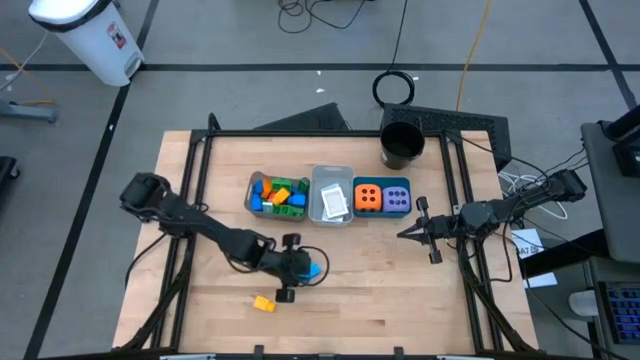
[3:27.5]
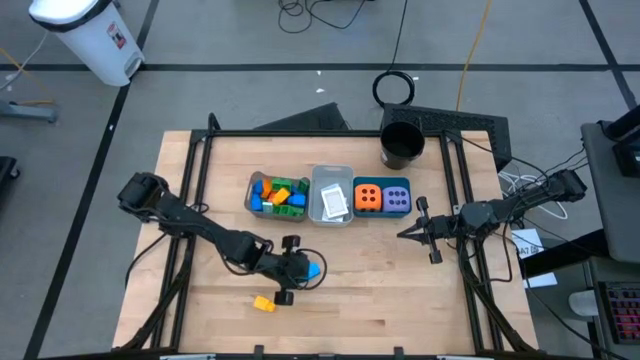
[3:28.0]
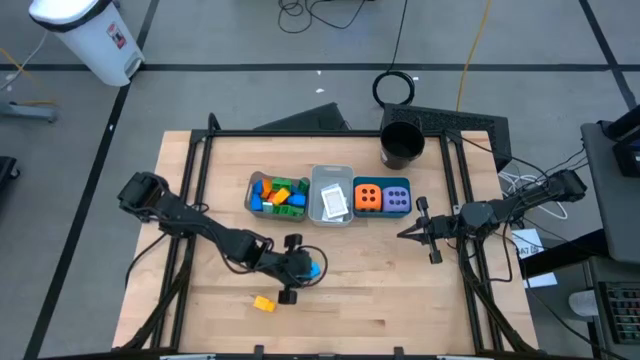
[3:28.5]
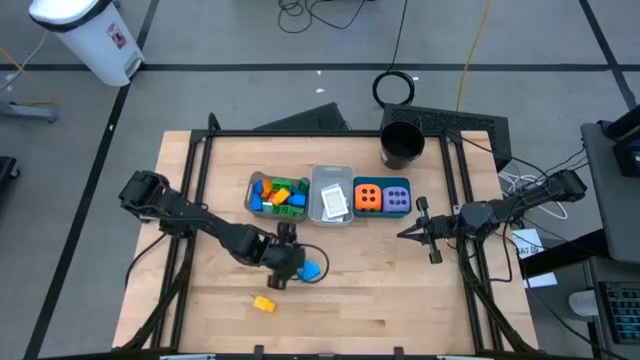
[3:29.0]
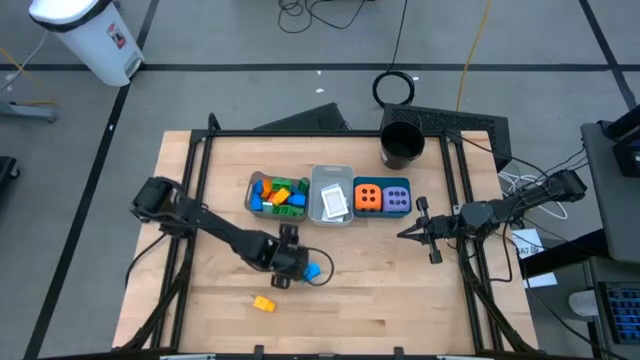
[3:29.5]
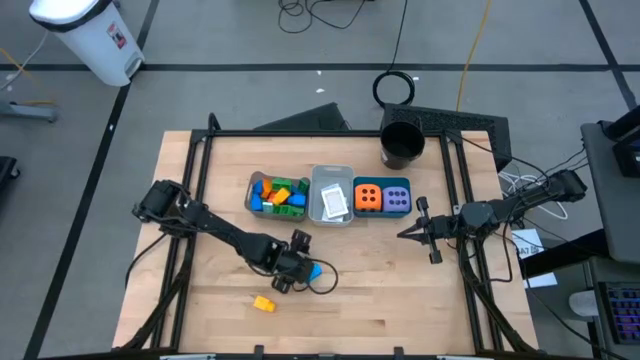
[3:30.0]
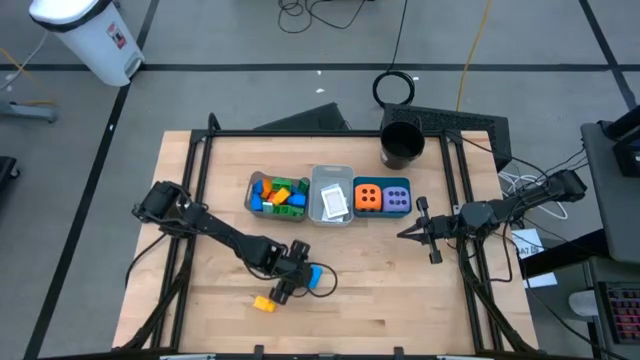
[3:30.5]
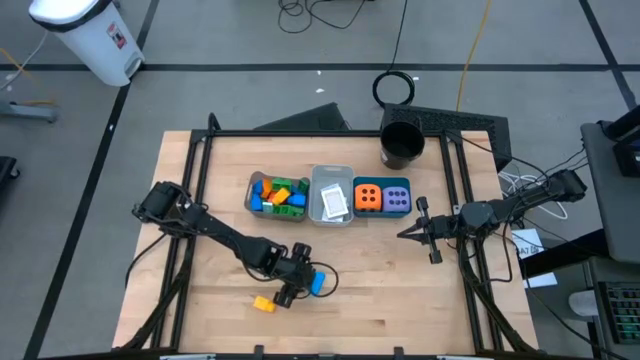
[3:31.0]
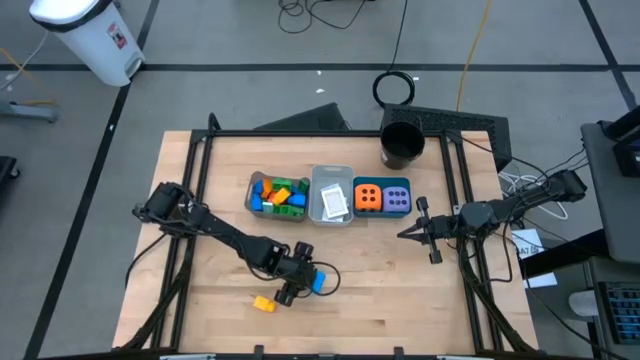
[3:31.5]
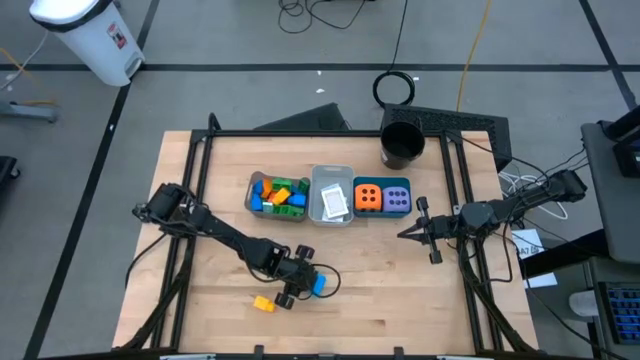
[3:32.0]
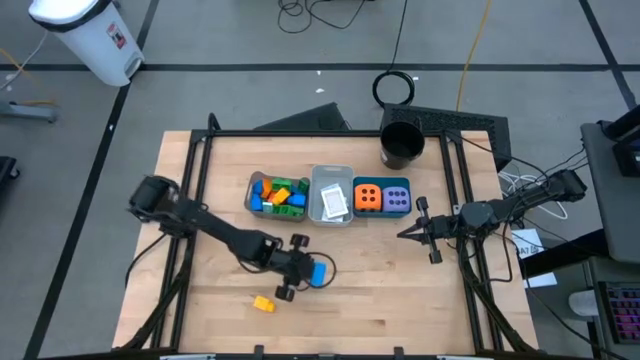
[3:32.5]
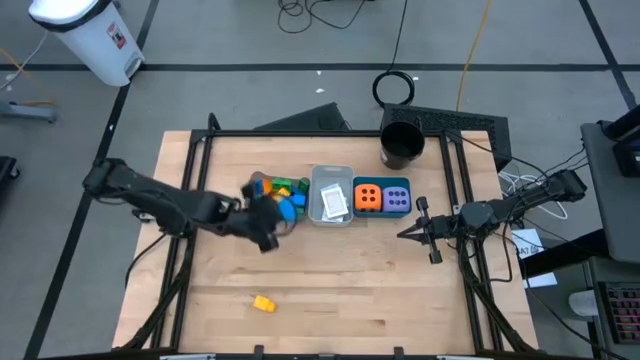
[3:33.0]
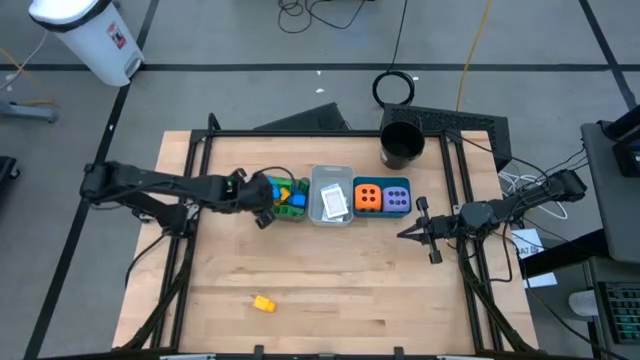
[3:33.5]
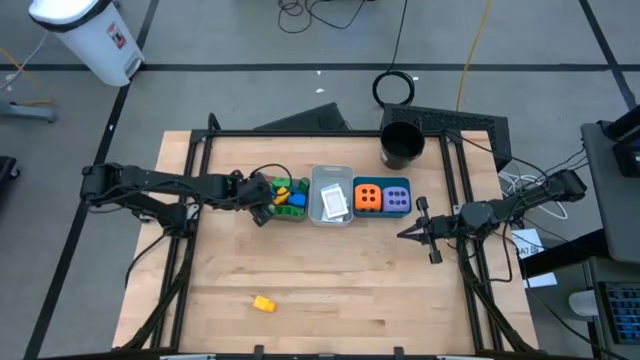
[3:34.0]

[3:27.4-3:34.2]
Task: Pick & Place Toys
Put the blue game piece into the black bin

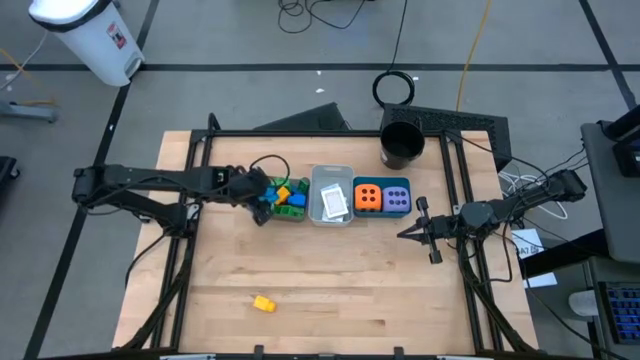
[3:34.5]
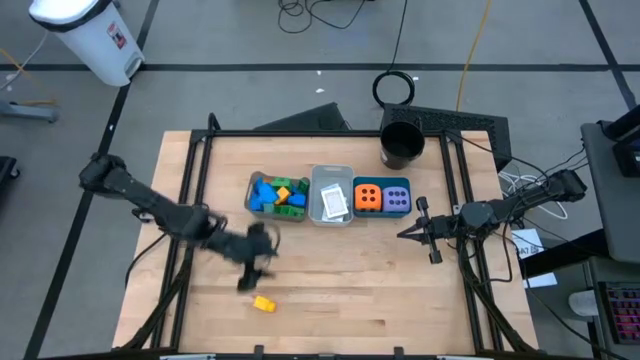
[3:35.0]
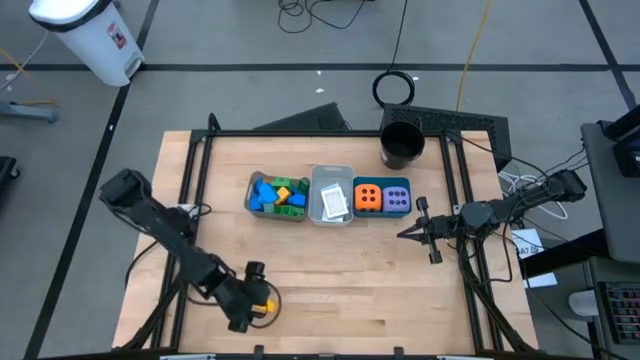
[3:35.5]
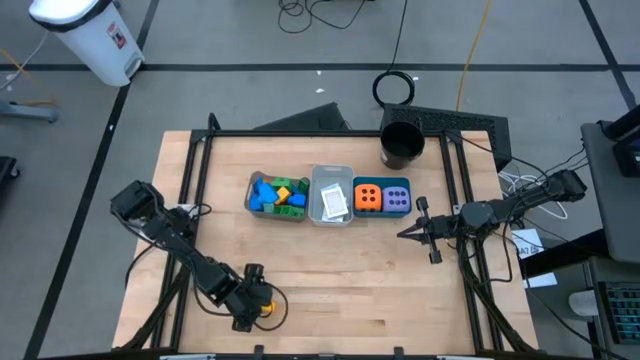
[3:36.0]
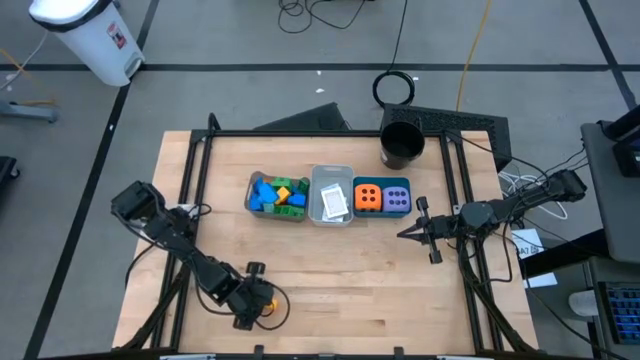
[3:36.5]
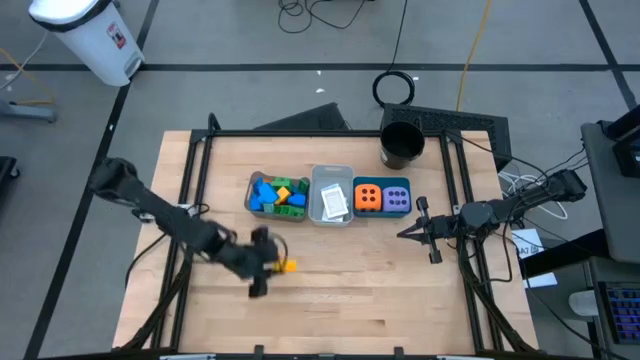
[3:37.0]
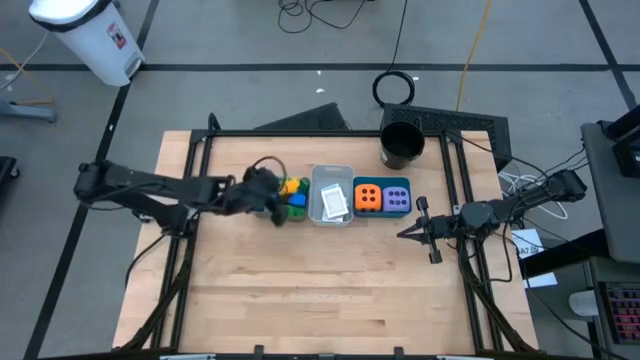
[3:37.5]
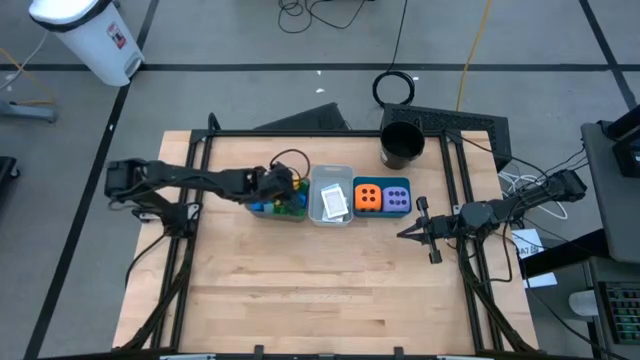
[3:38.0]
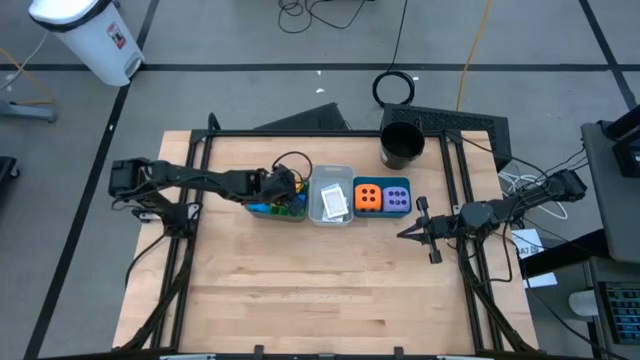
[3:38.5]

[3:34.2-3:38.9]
Put the yellow game piece into the black bin

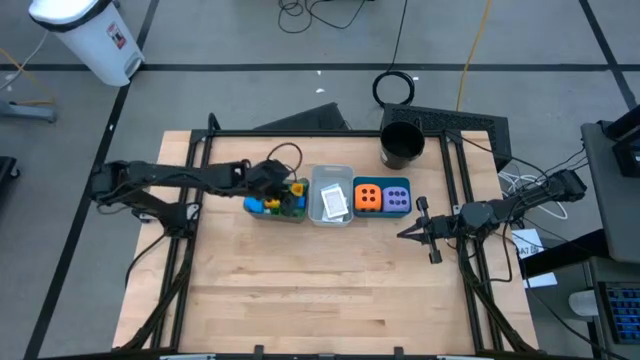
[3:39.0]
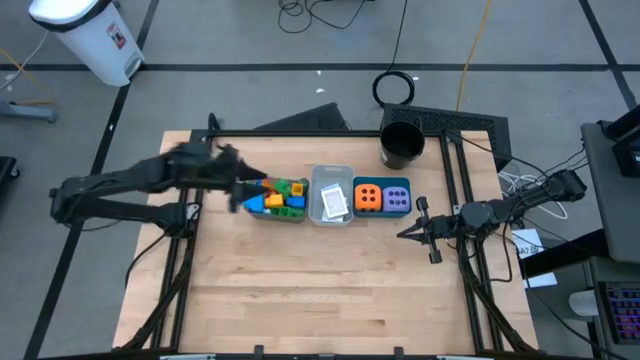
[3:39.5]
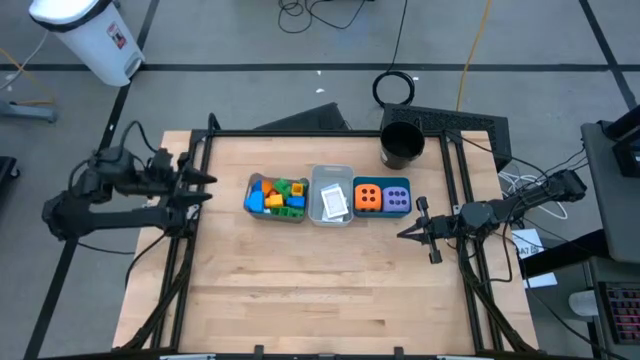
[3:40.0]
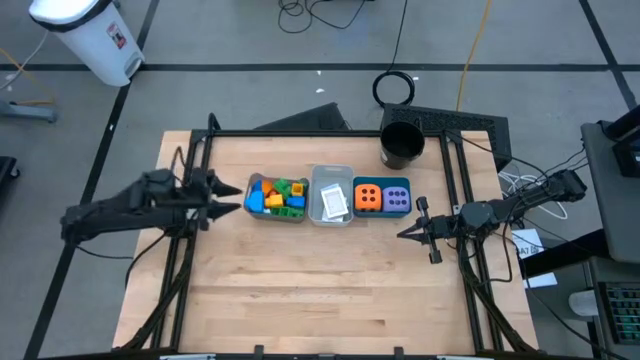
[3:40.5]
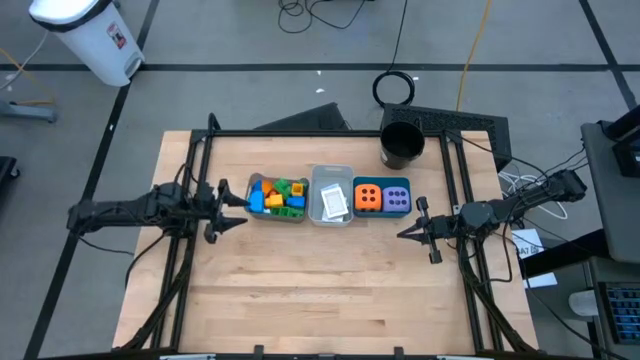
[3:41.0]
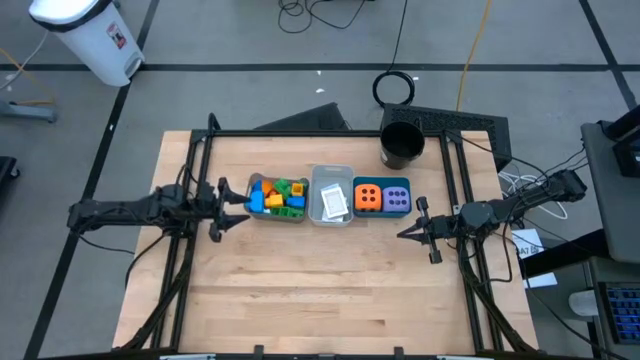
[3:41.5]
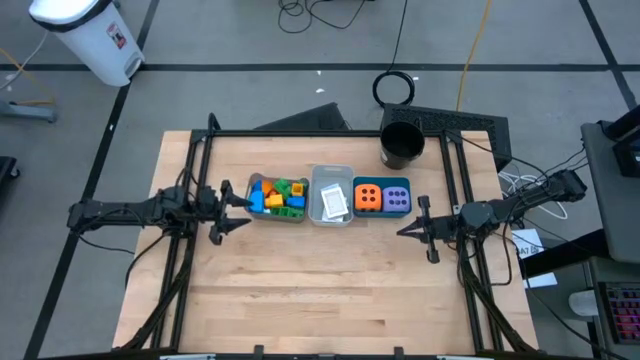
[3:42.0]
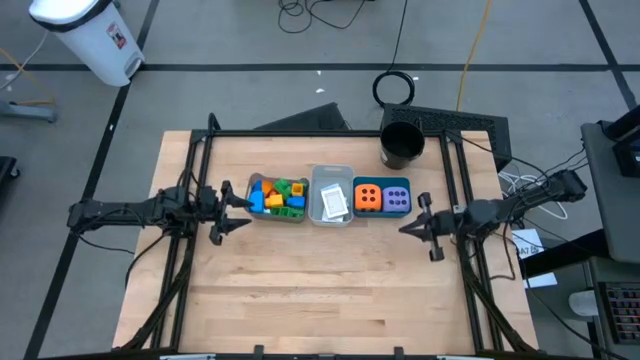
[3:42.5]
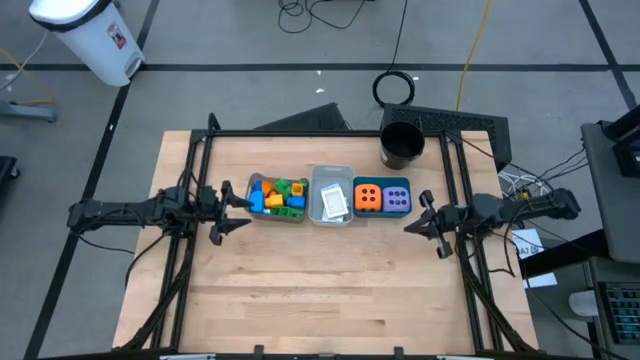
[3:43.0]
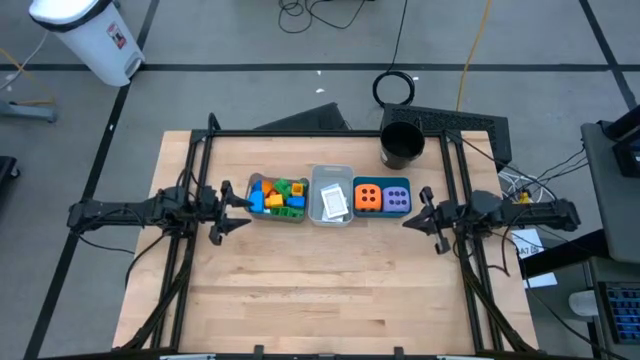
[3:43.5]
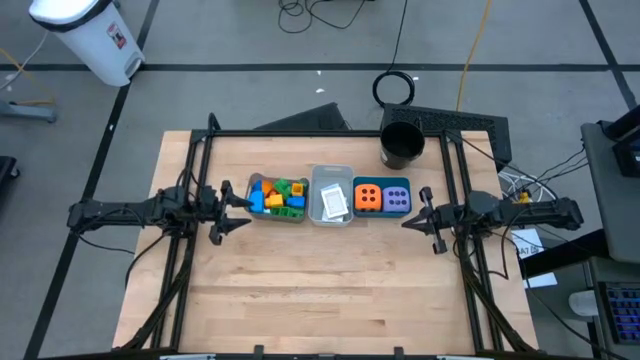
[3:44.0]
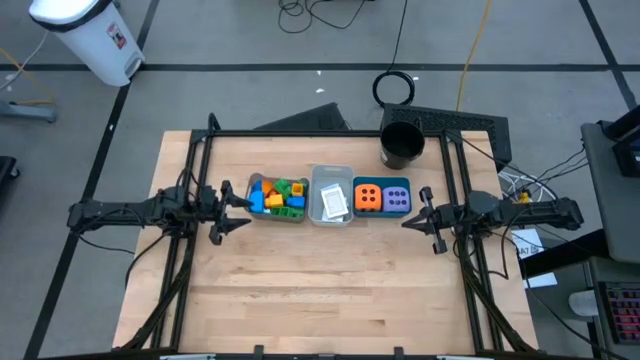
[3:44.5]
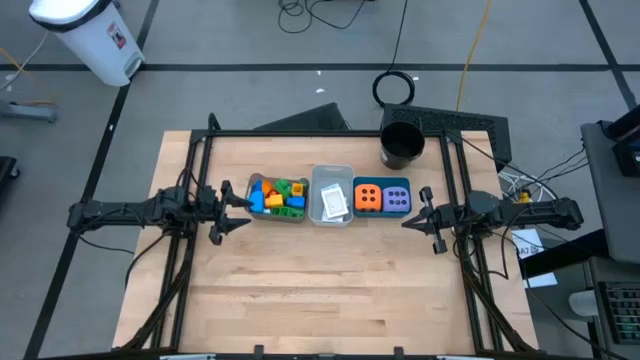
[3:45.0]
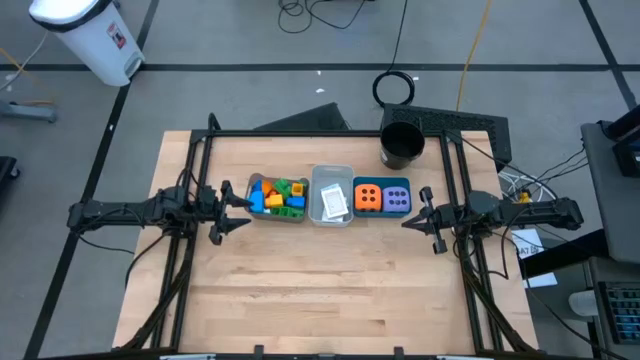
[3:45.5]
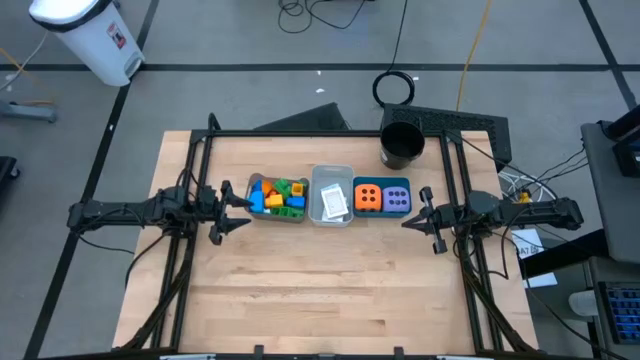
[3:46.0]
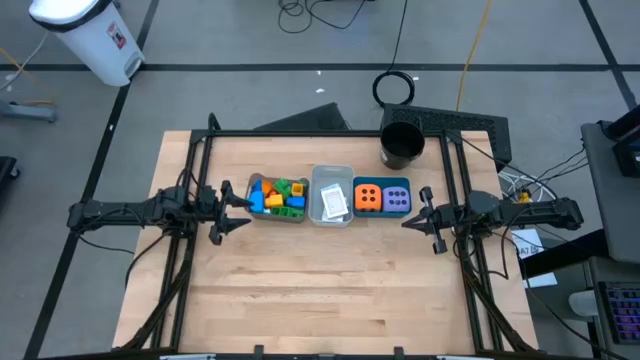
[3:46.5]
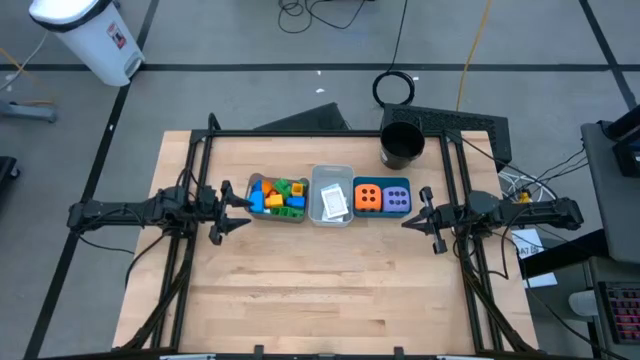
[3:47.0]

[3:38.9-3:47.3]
Return to Home Position

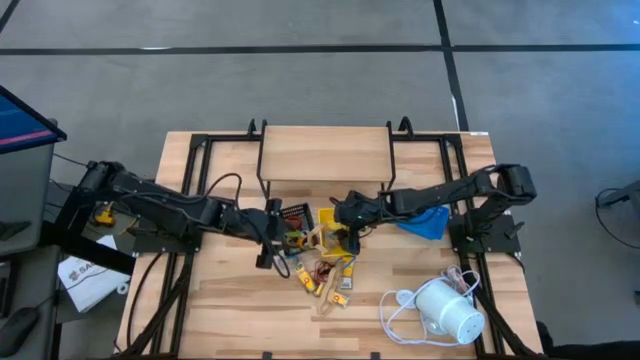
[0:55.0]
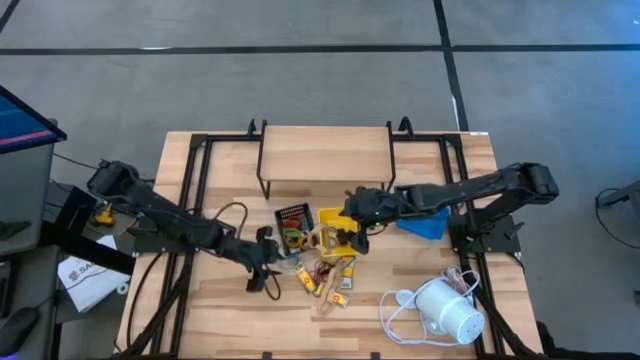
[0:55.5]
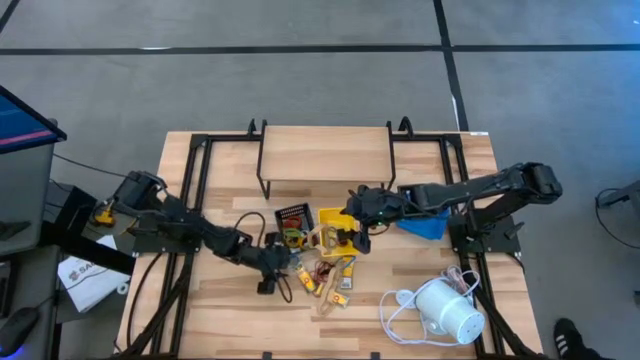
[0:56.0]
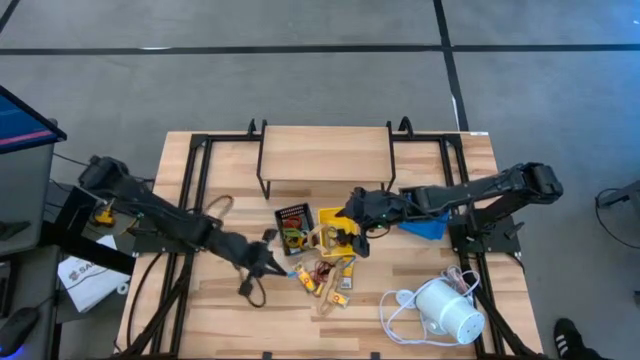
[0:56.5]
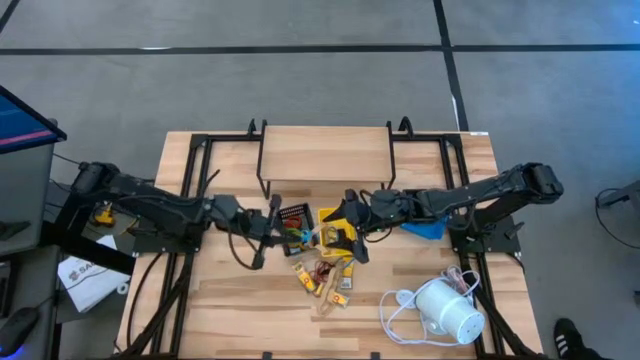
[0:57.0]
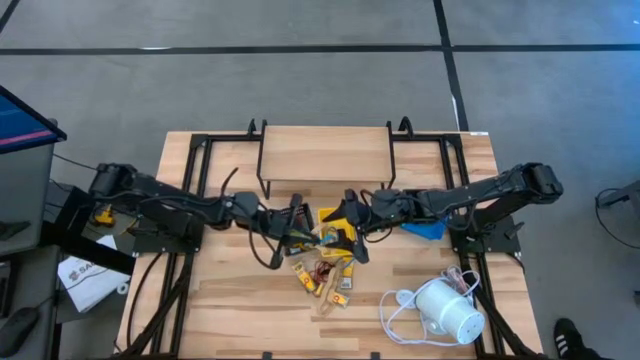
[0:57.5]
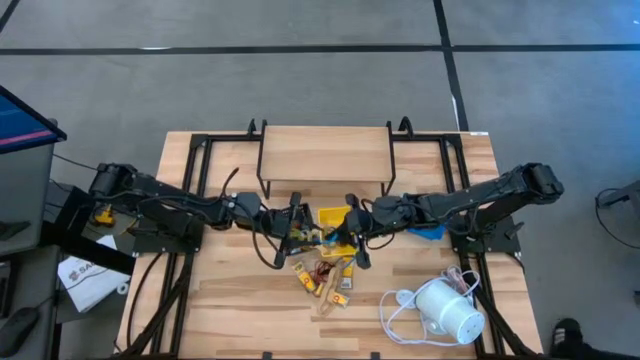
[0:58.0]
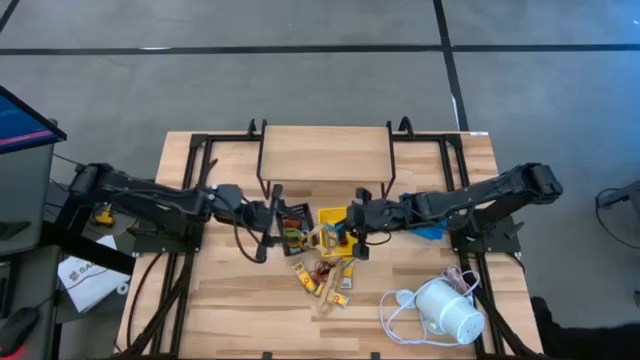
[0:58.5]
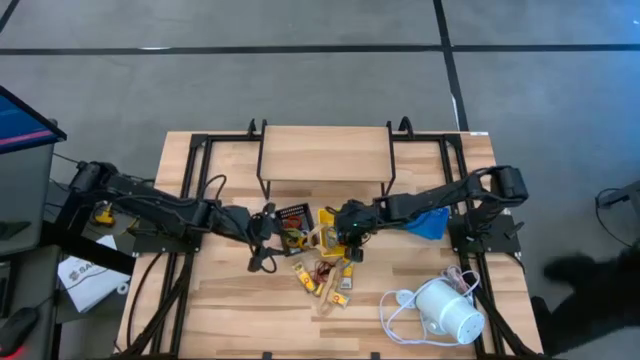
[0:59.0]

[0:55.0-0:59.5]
Task: Pick & Place Office Desk Supplies
Put the blue rubber band into the yellow bin
